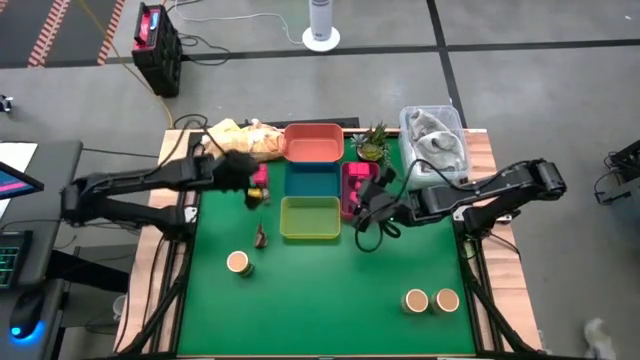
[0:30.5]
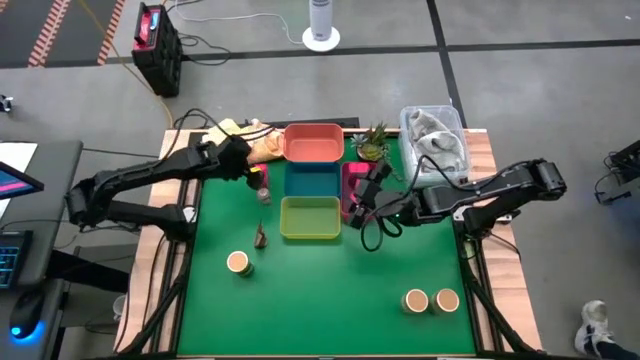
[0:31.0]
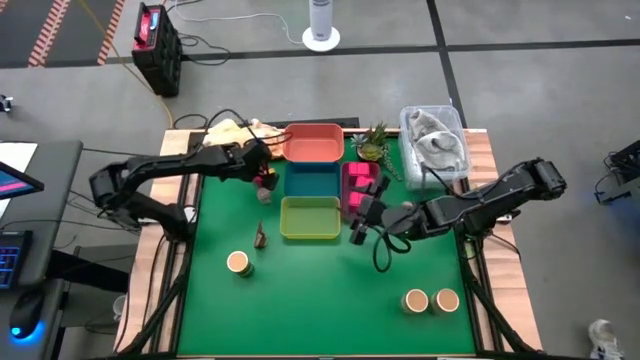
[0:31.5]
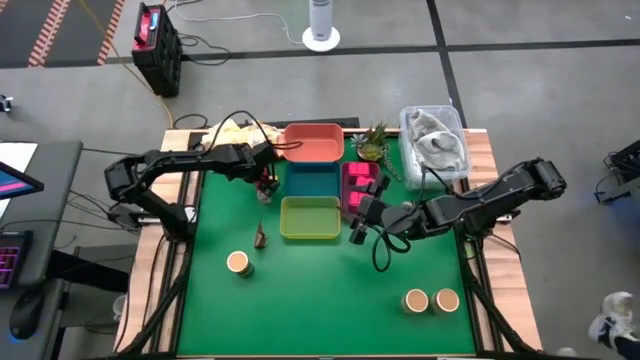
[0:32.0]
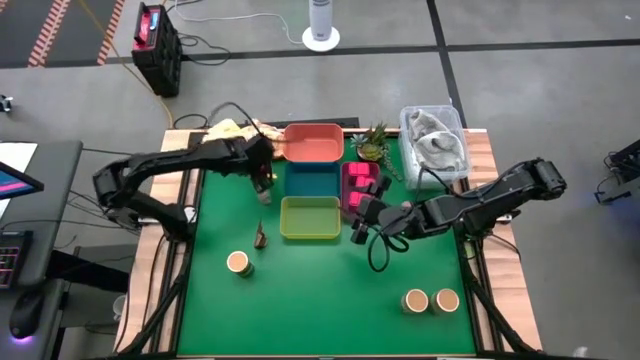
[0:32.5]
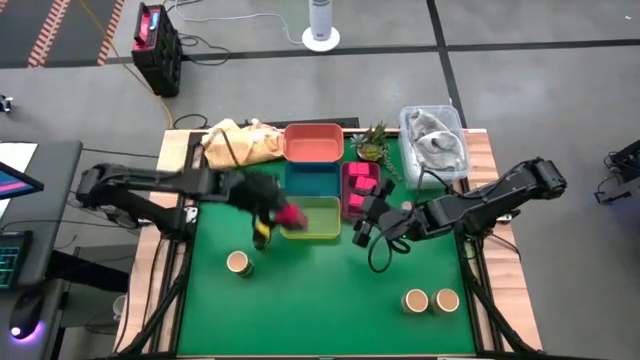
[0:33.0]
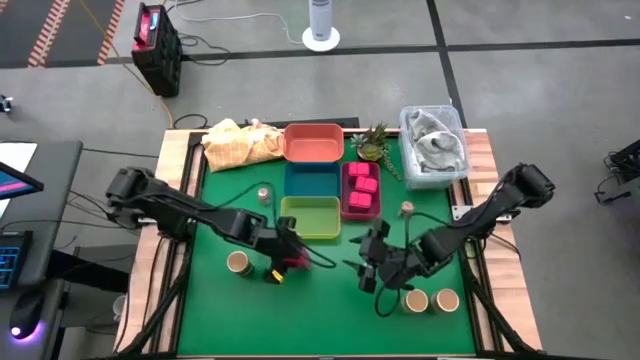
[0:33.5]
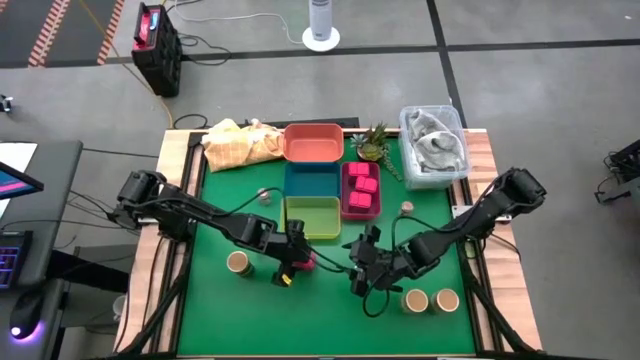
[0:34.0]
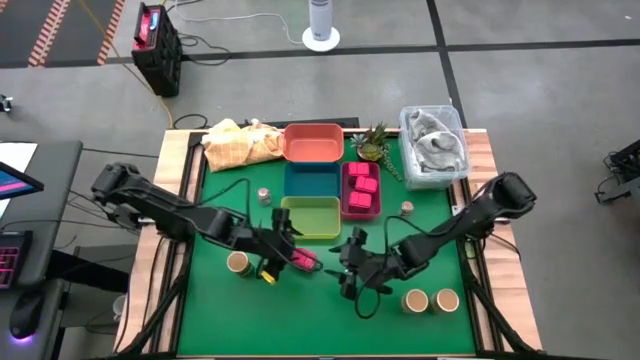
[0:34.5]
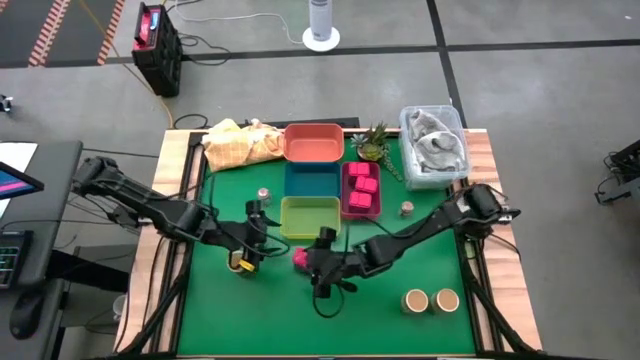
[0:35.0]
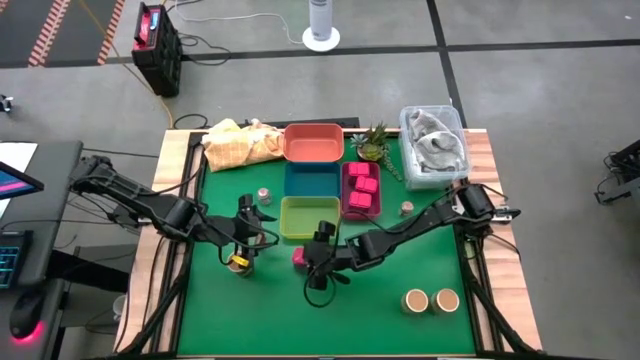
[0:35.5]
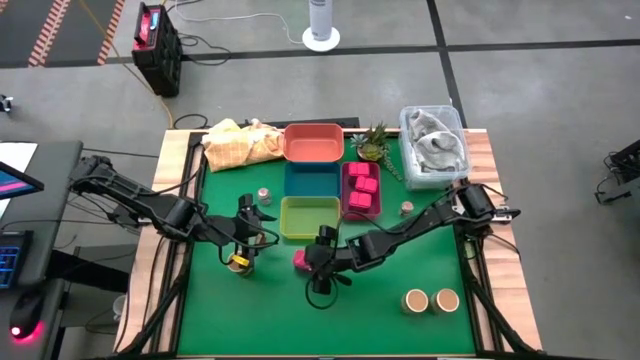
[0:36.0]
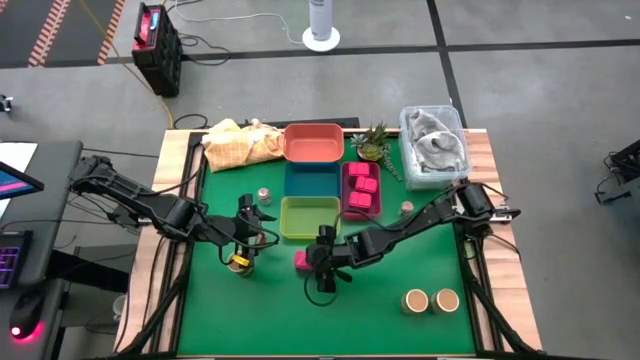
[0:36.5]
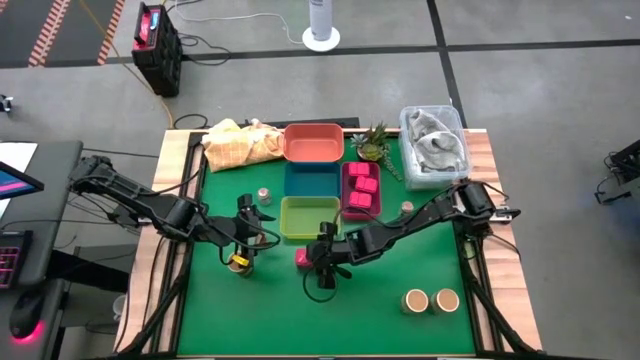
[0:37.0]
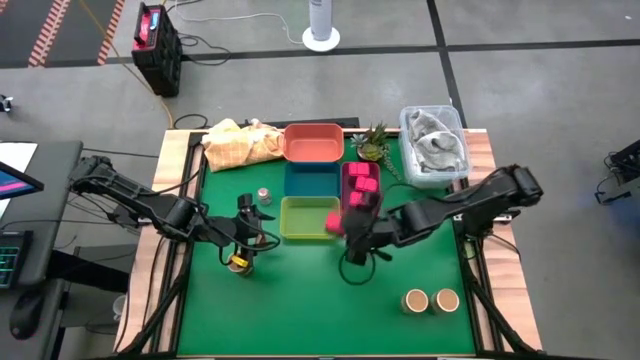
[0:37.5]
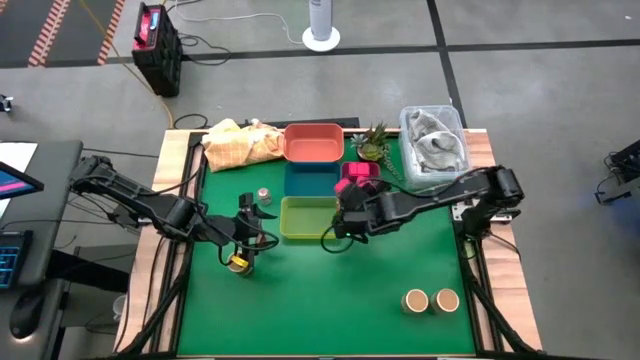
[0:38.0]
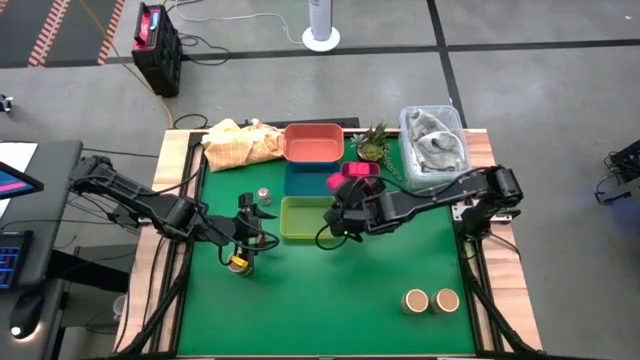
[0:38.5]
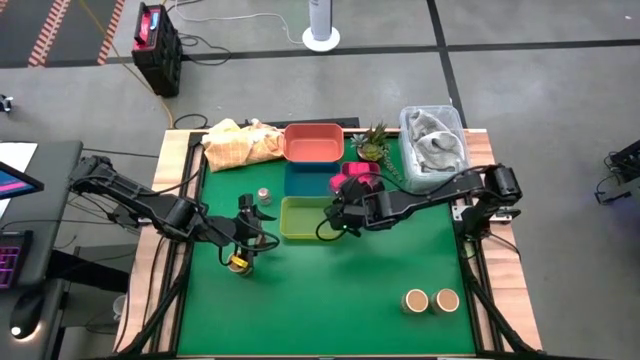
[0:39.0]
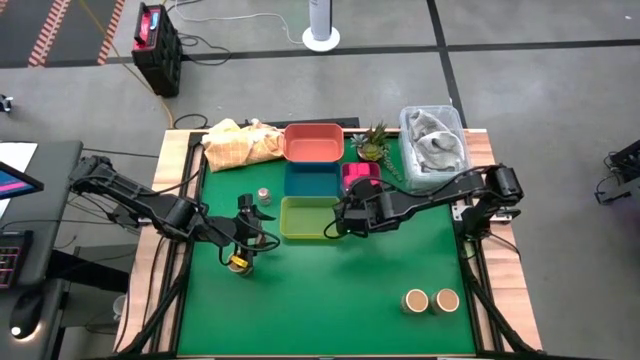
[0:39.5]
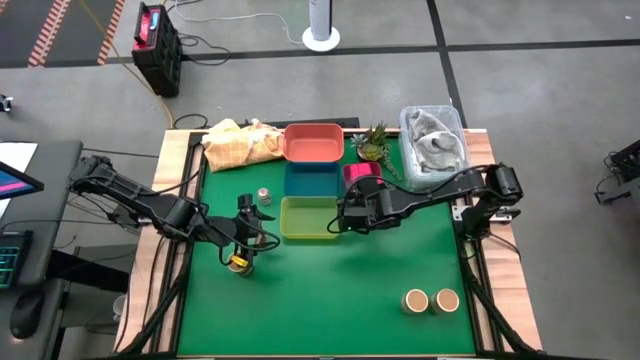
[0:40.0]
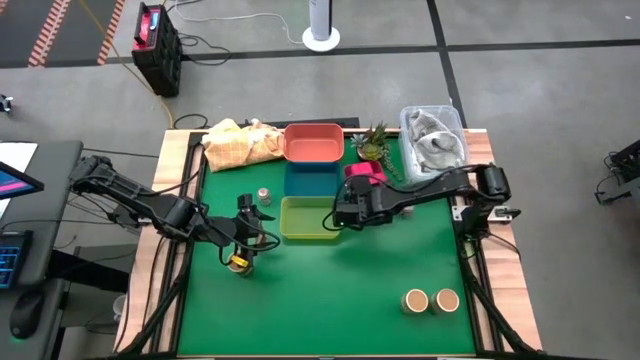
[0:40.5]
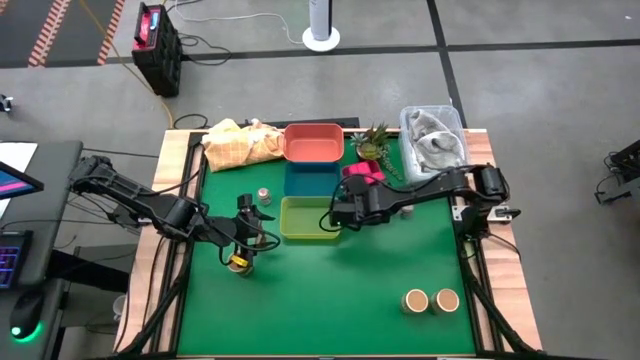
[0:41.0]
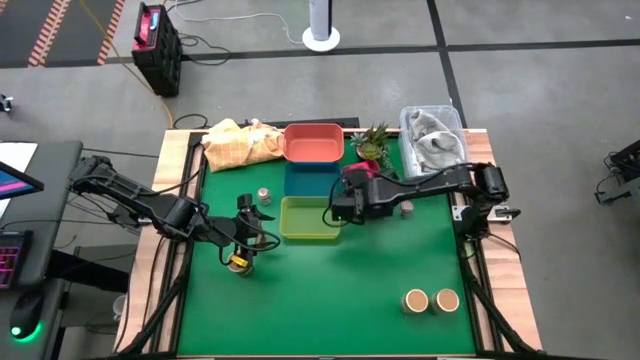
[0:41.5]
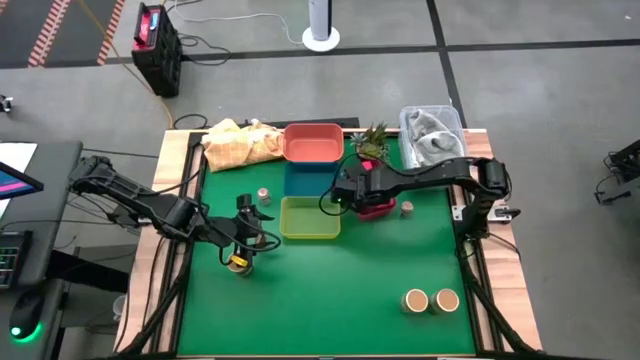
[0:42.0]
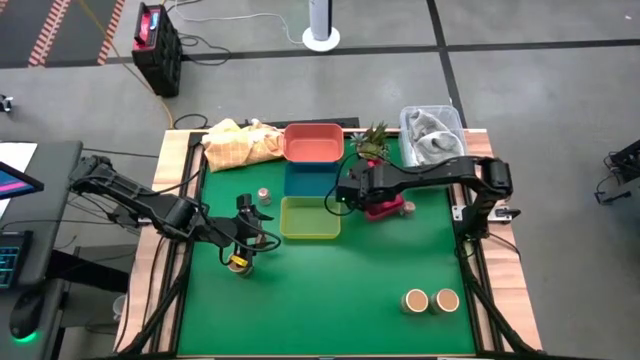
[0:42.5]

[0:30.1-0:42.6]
Task: Sort spices by type
Put the red seasoning can into the red bin

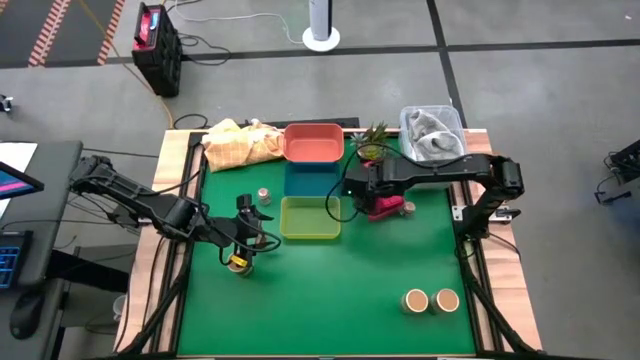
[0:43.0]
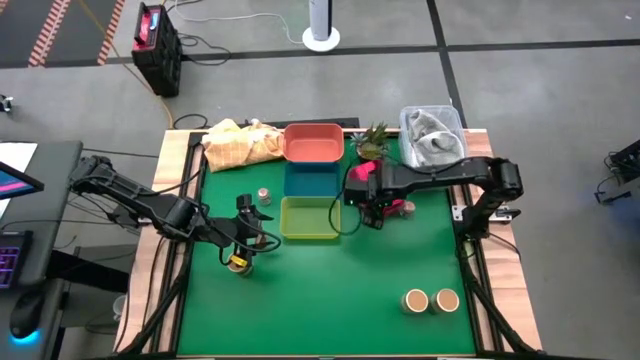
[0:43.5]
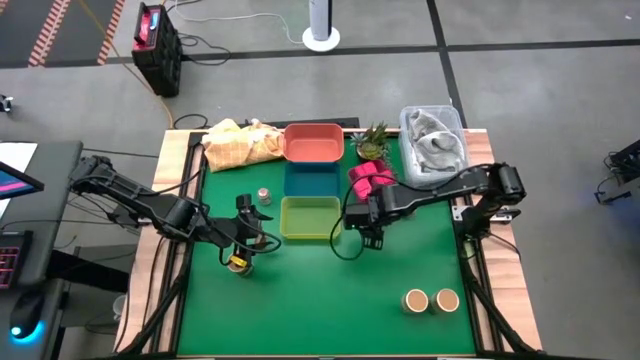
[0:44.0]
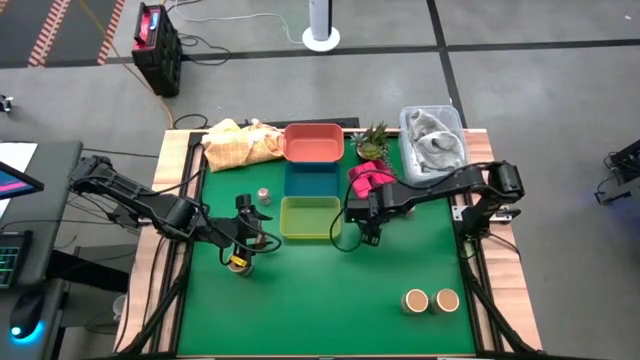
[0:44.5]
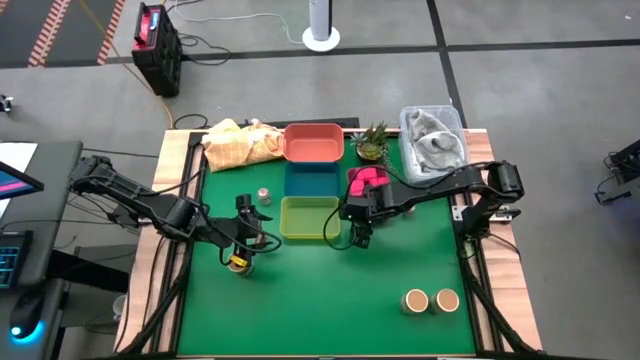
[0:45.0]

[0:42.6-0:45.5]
Adjust the red bin

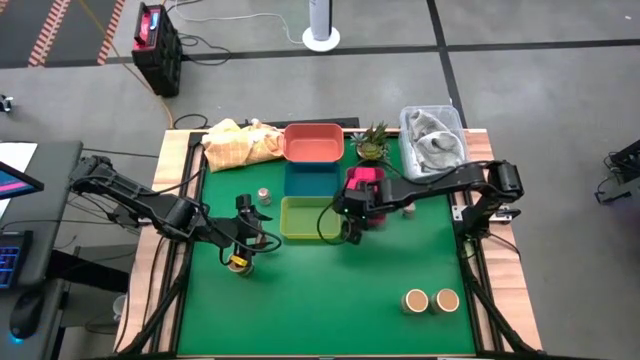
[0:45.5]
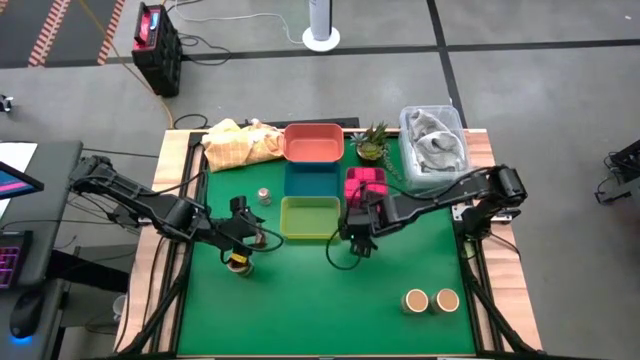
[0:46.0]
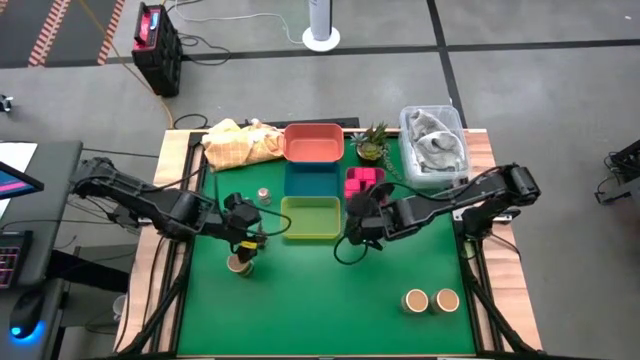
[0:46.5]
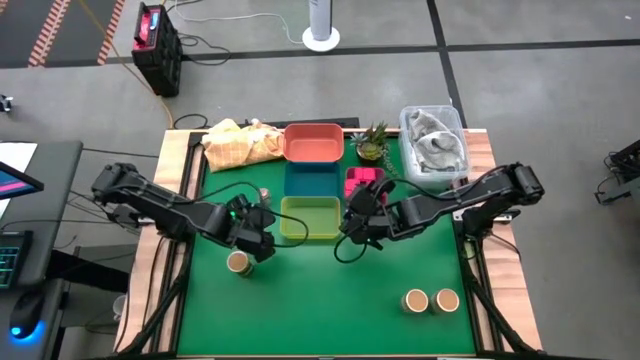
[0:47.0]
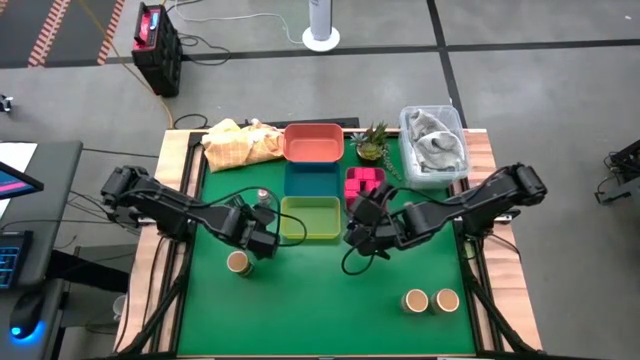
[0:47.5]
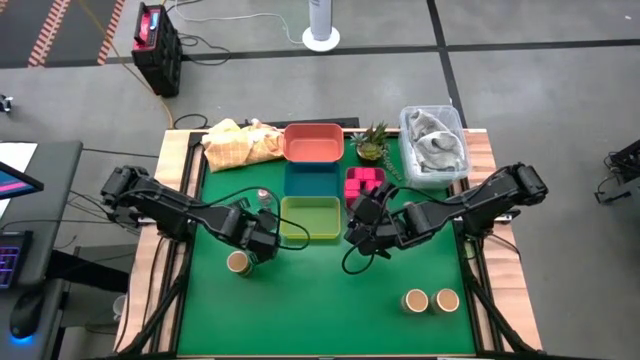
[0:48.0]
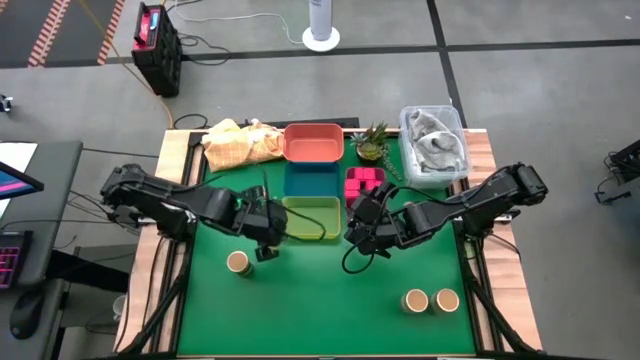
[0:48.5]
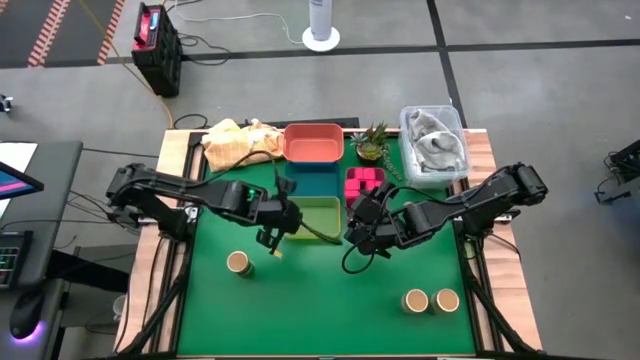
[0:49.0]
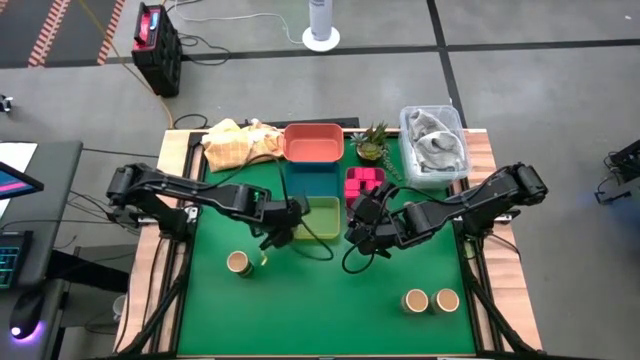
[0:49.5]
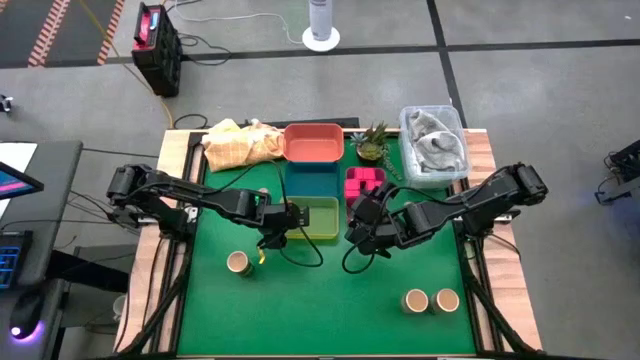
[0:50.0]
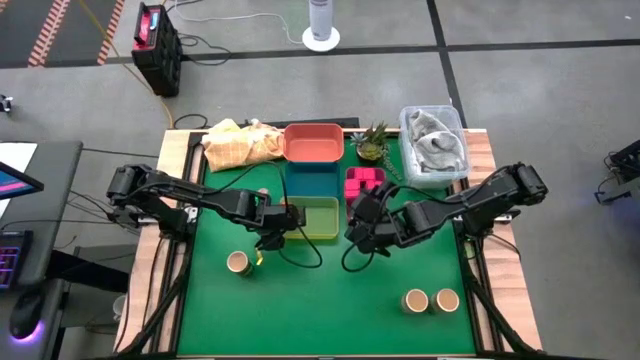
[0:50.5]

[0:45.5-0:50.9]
Put the orange seasoning bag into the yellow bin
